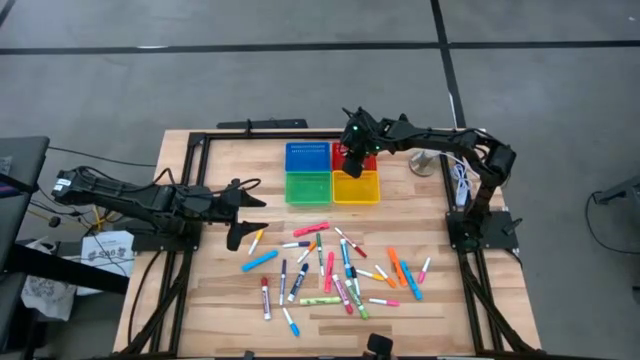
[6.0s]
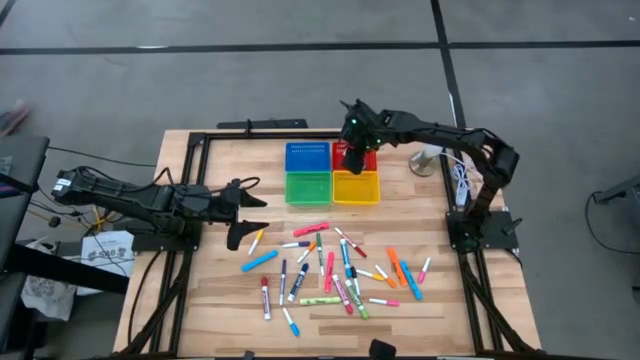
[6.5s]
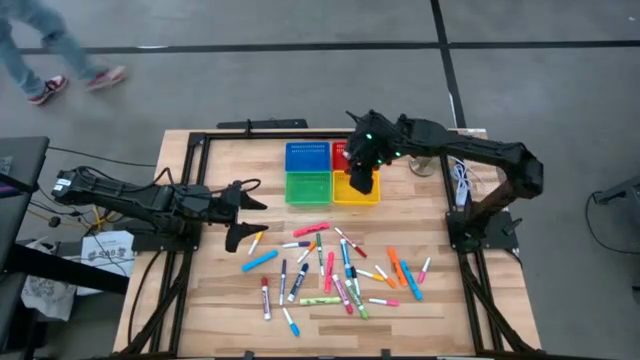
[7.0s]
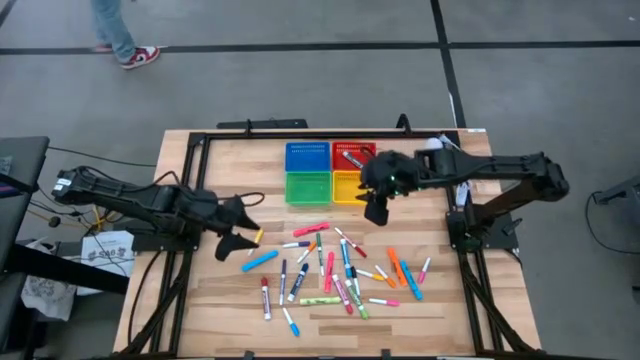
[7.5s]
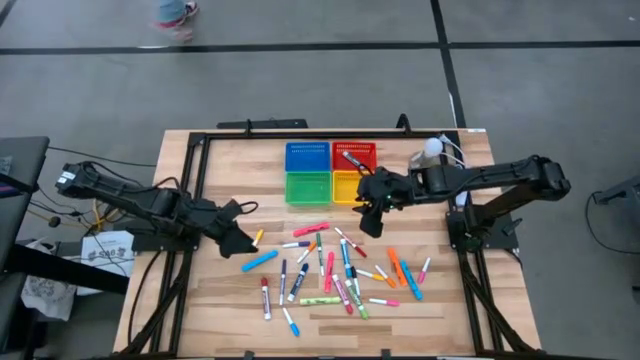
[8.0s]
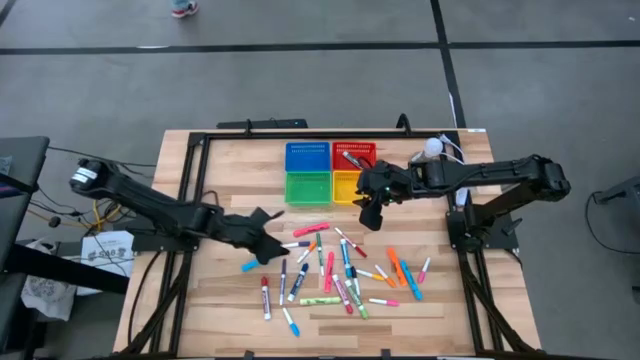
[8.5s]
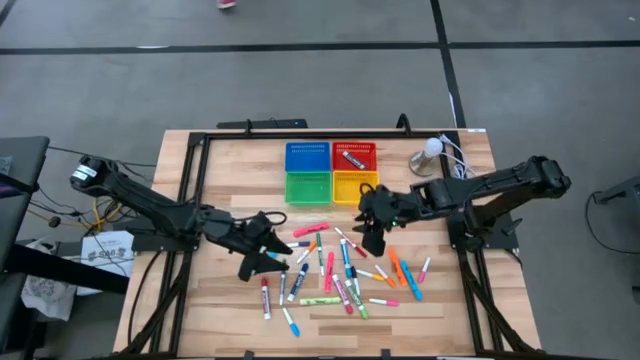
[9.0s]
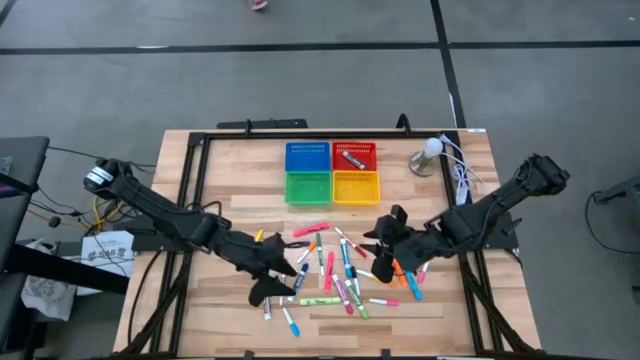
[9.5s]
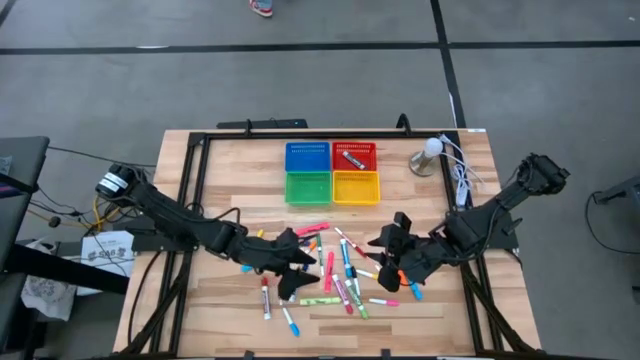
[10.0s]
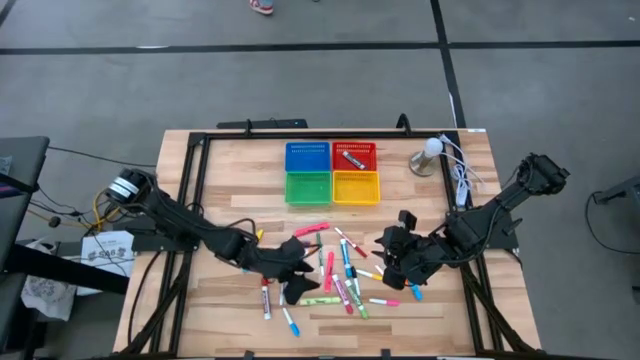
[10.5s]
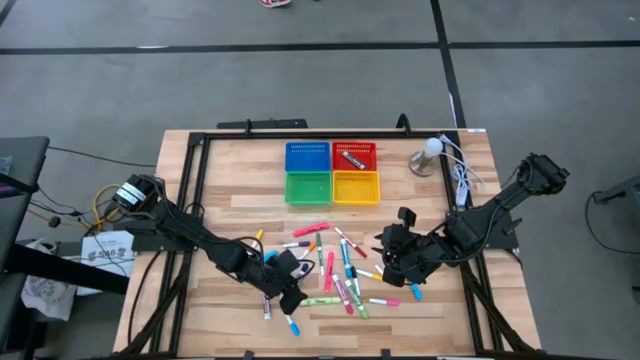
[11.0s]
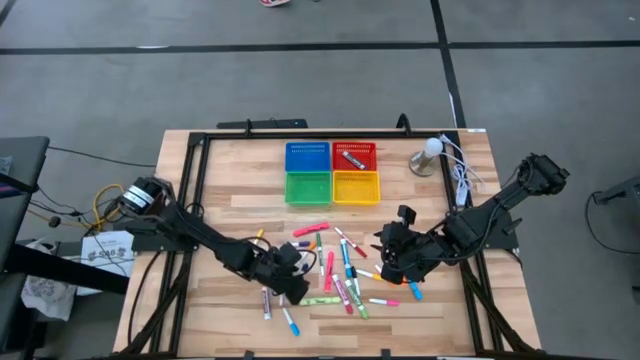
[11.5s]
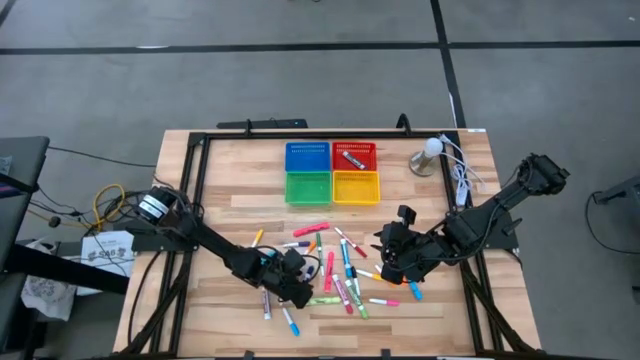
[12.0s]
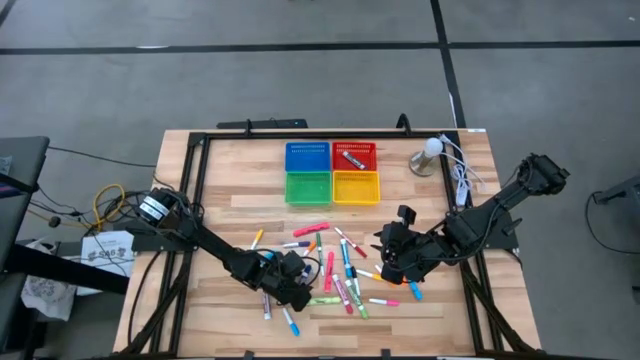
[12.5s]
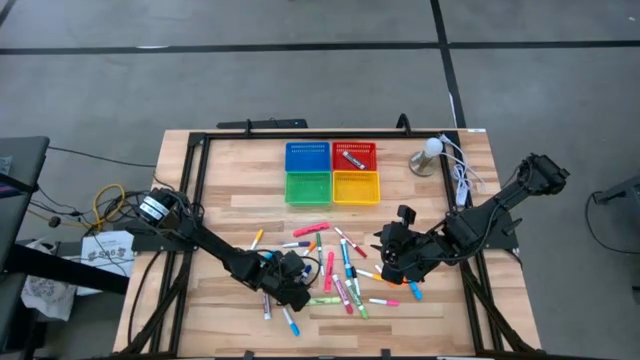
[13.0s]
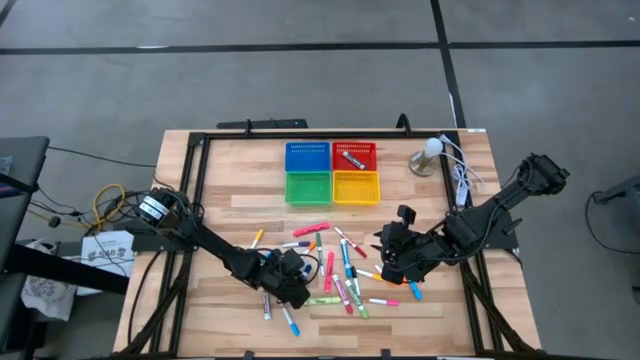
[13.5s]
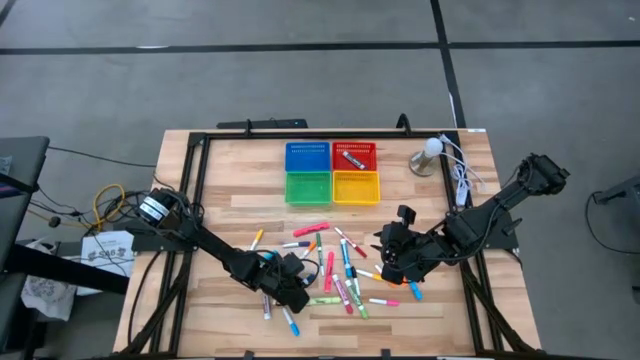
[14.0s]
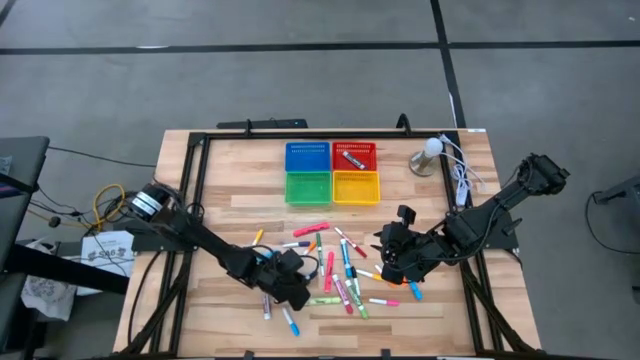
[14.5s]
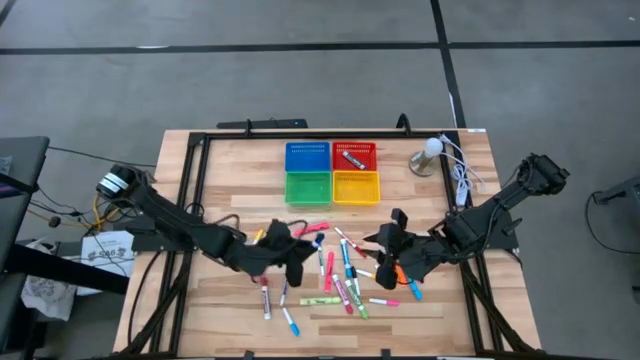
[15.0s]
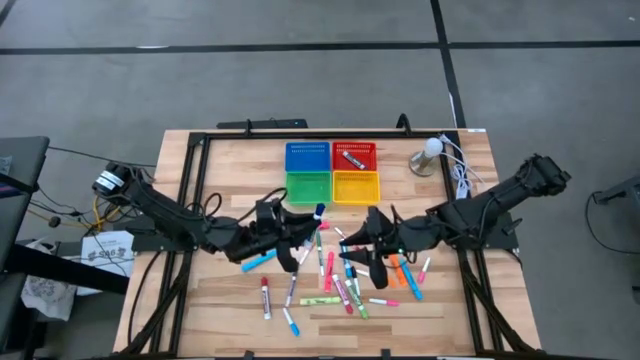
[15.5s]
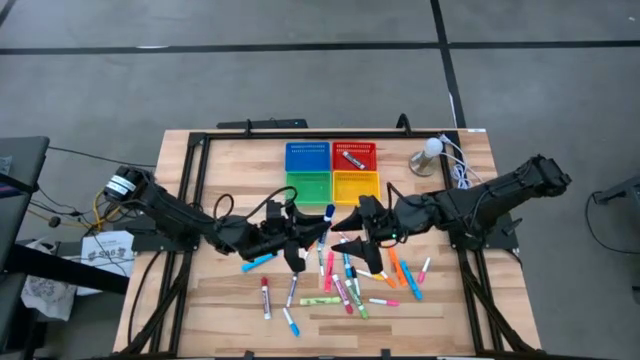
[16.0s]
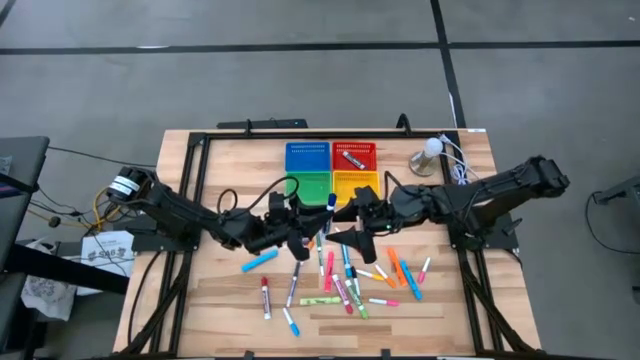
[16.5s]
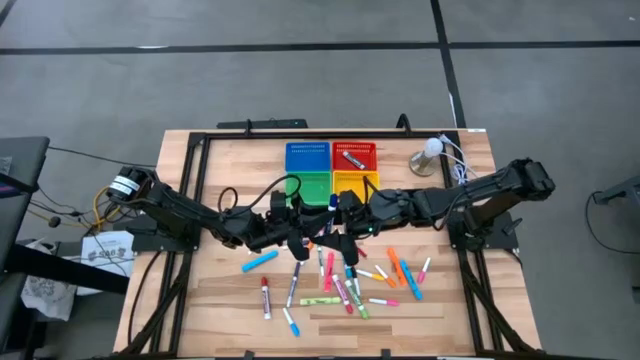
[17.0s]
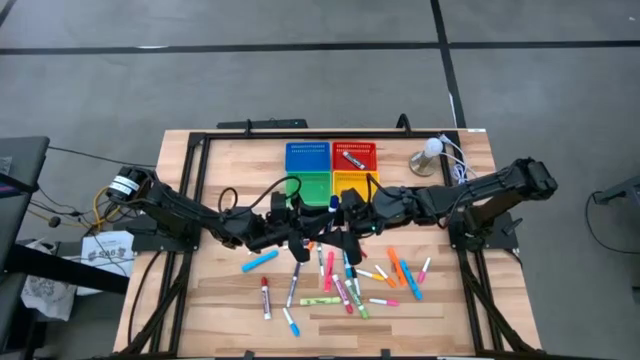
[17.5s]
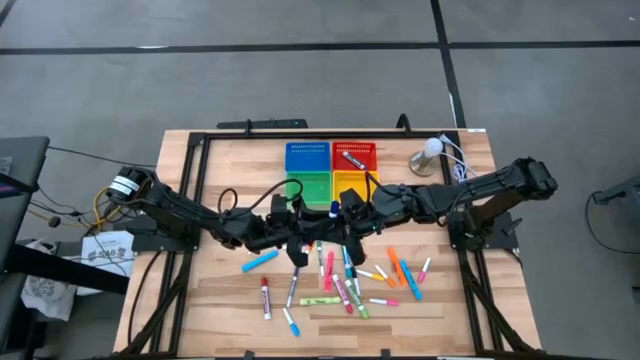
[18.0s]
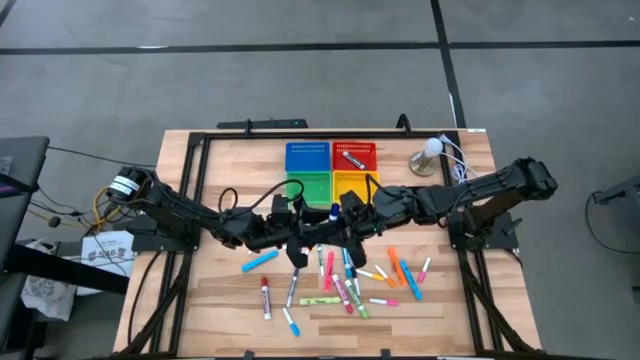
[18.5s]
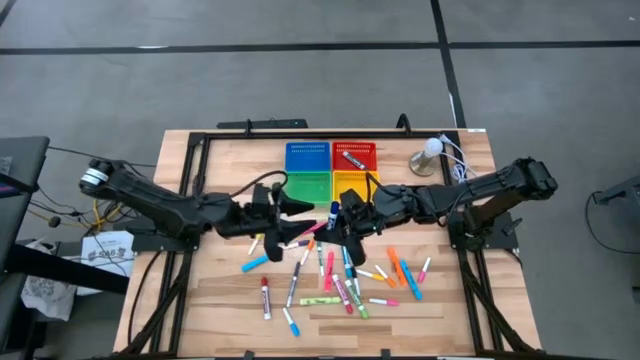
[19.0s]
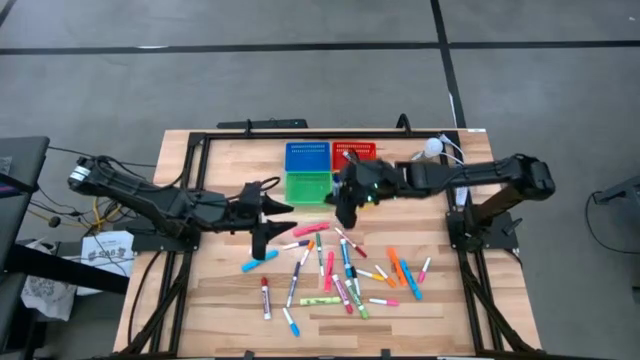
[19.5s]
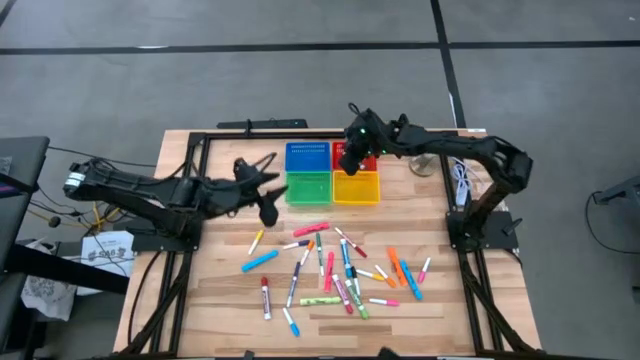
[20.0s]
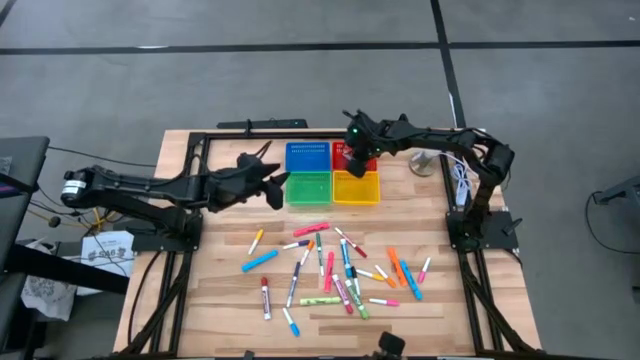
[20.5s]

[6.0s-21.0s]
Task: Pick & Place Markers
Put the blue thick dry erase marker into the red bin

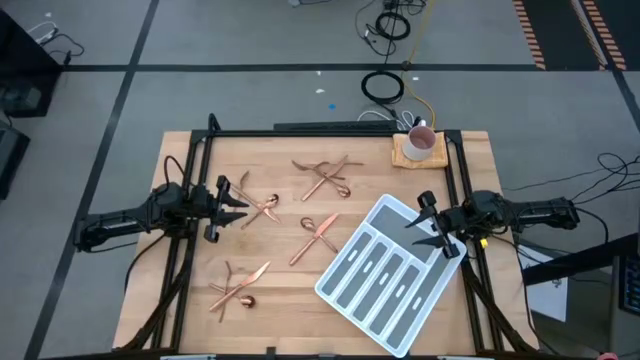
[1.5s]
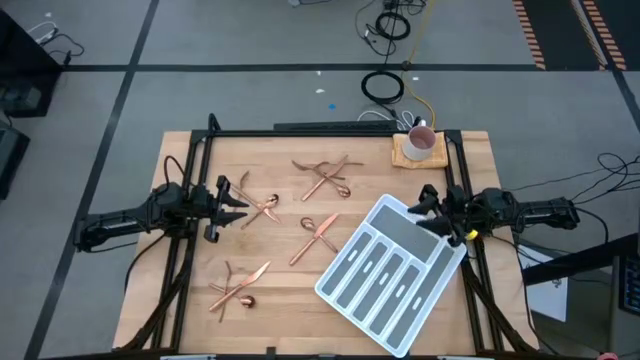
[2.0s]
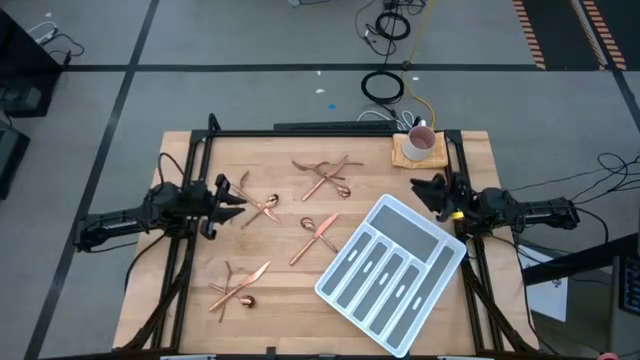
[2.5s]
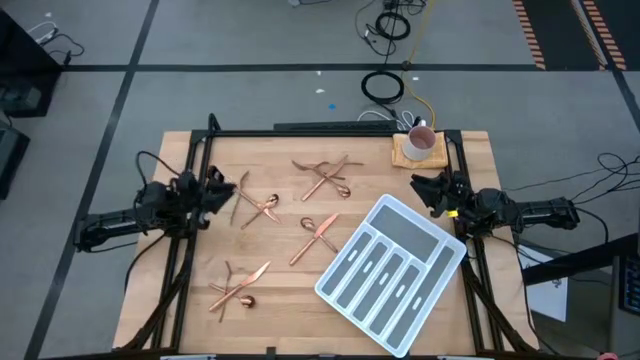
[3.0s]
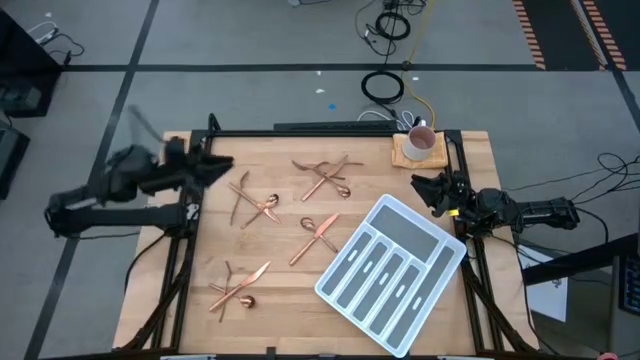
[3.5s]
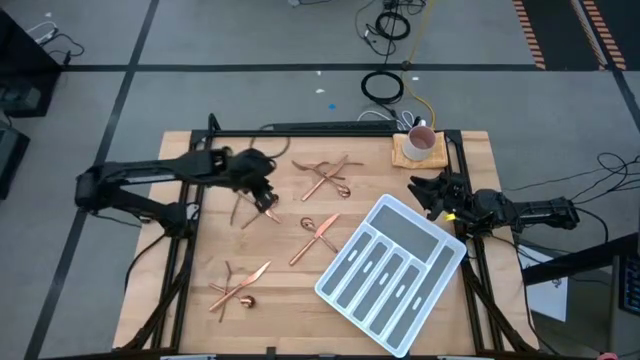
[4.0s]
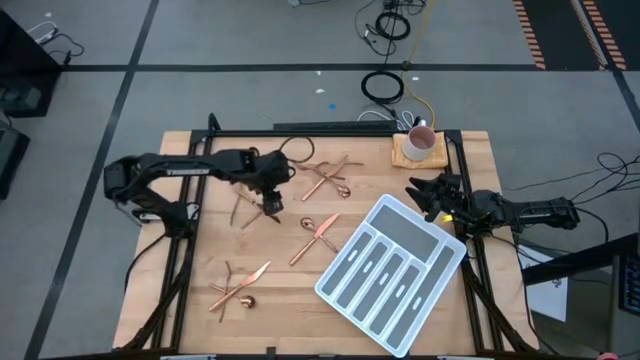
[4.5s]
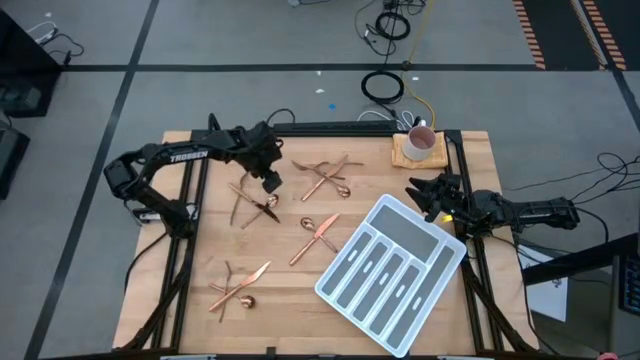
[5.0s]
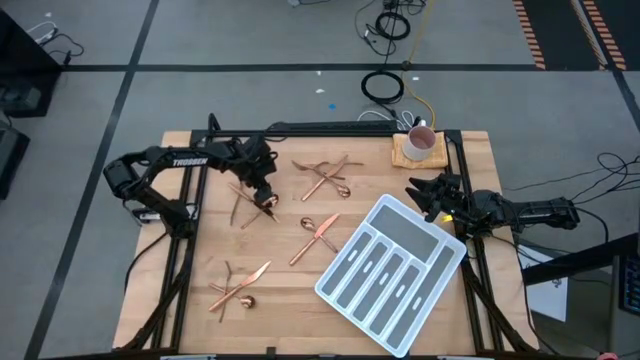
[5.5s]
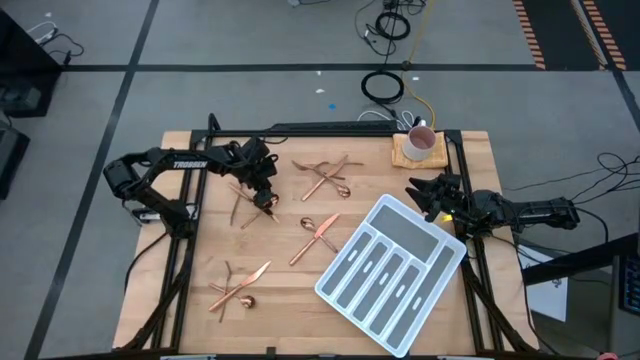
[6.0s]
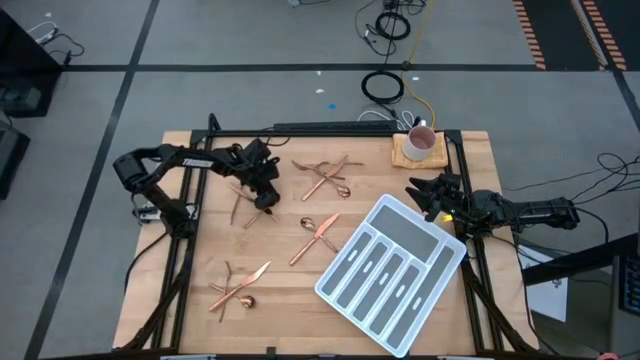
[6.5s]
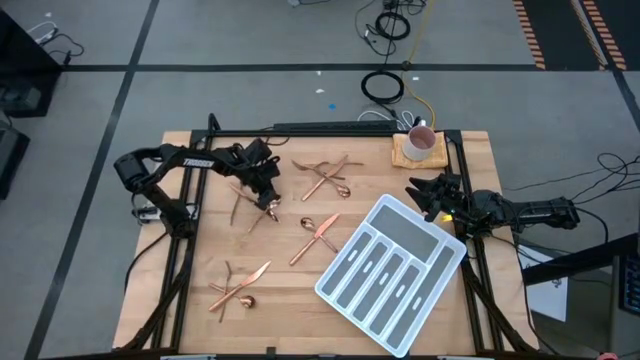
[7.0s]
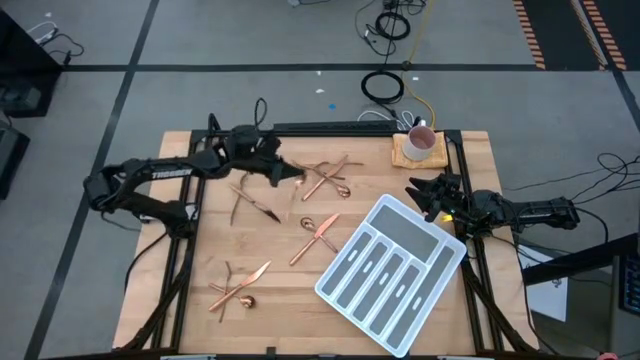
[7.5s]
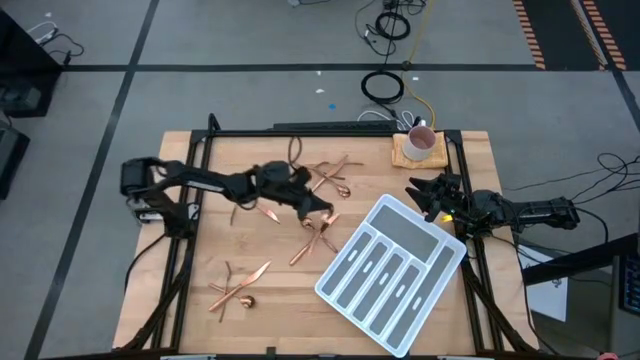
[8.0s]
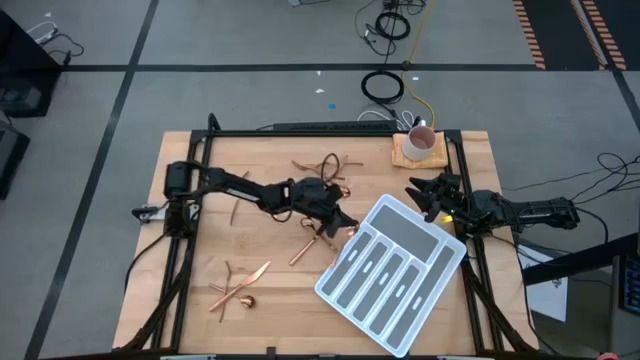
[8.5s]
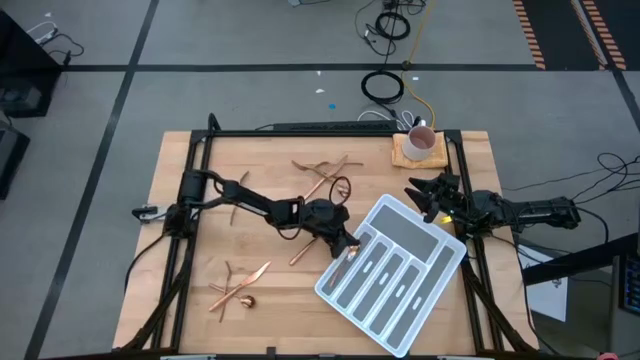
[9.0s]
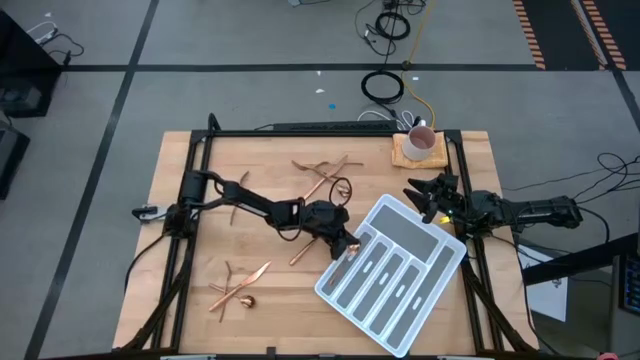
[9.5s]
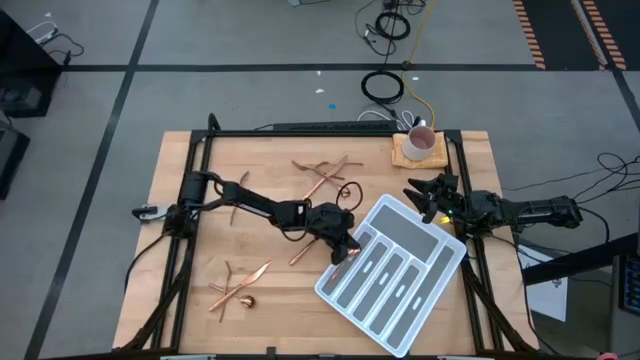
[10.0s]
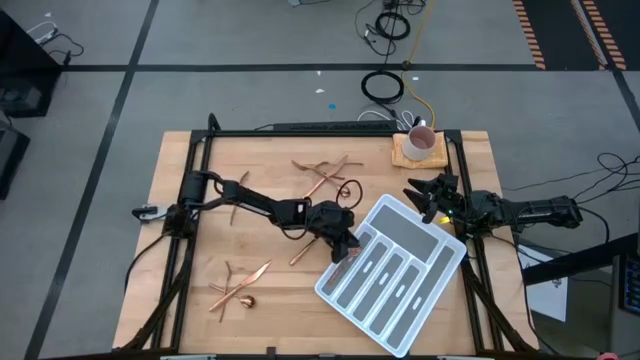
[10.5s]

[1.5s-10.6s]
Task: Sort silverware
Put the gold spoon into the cutlery tray
